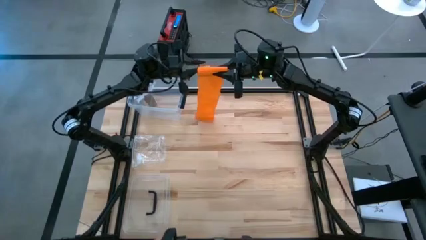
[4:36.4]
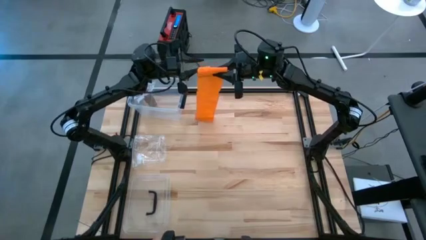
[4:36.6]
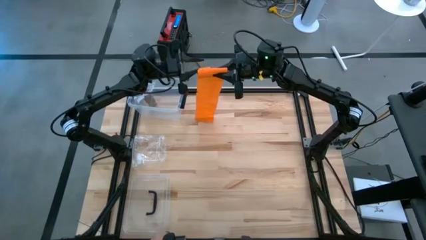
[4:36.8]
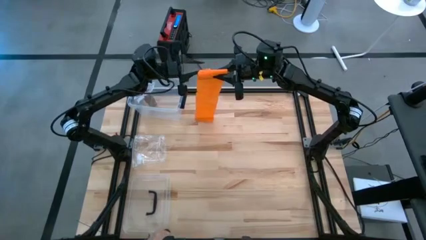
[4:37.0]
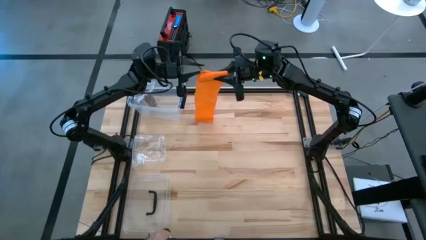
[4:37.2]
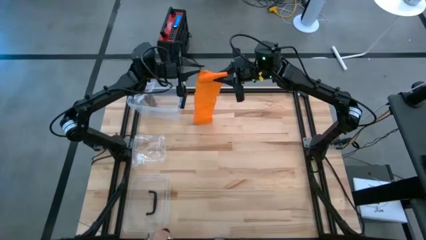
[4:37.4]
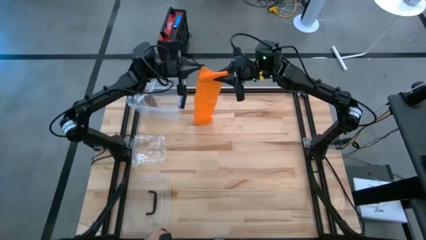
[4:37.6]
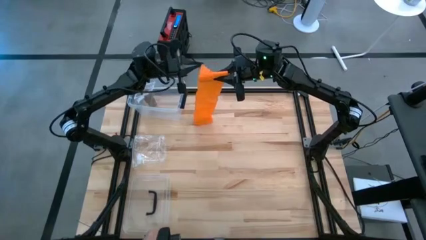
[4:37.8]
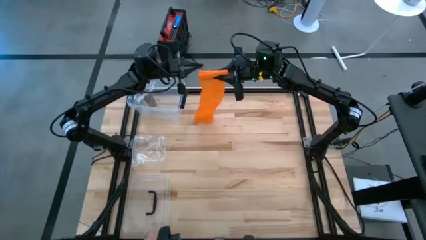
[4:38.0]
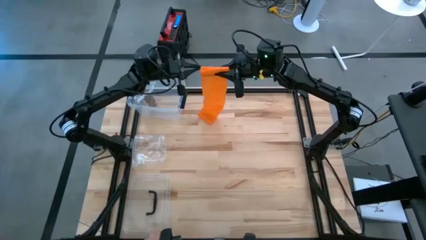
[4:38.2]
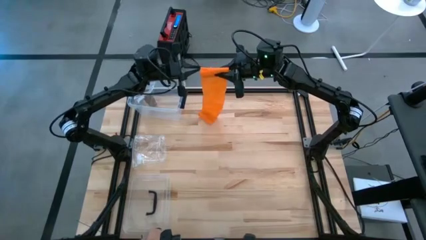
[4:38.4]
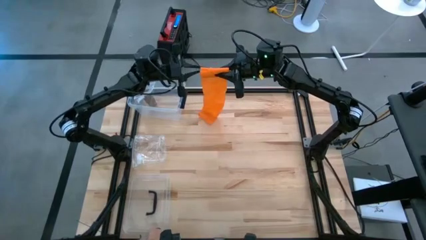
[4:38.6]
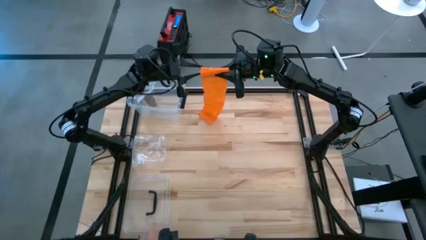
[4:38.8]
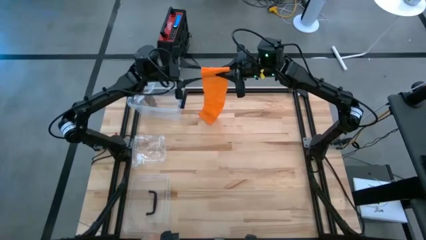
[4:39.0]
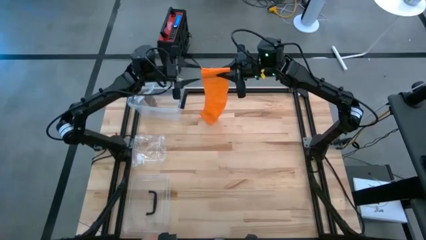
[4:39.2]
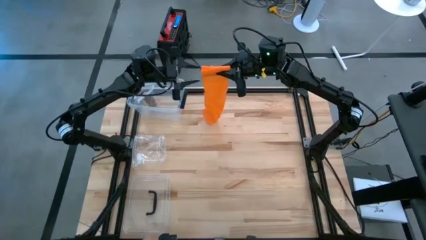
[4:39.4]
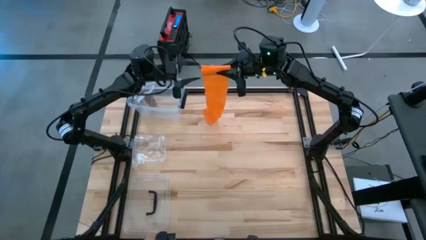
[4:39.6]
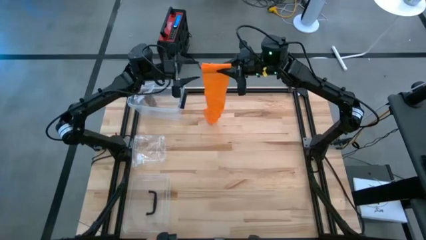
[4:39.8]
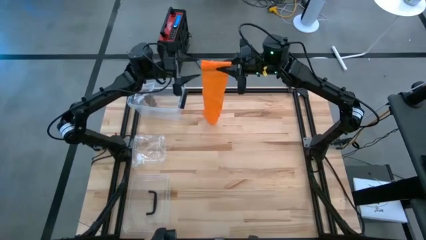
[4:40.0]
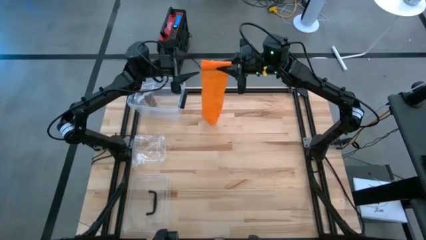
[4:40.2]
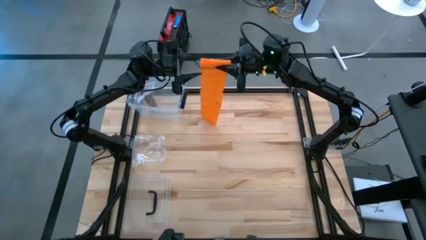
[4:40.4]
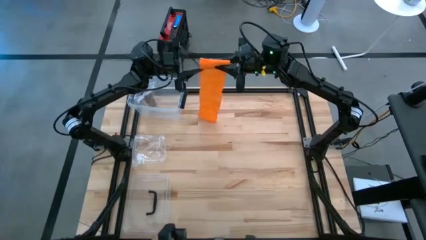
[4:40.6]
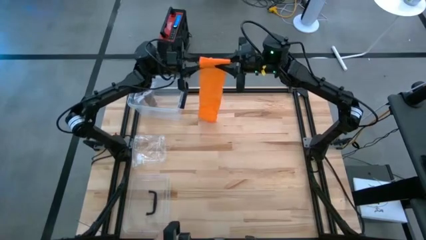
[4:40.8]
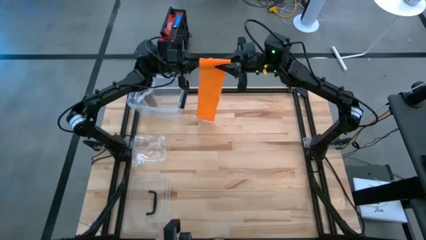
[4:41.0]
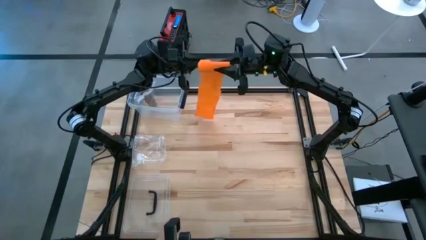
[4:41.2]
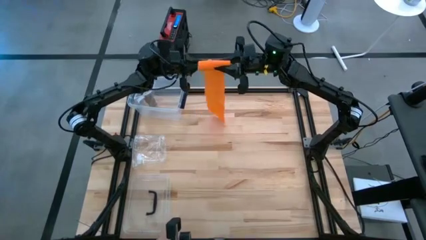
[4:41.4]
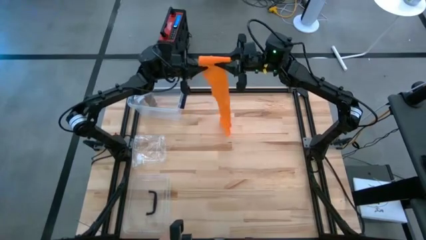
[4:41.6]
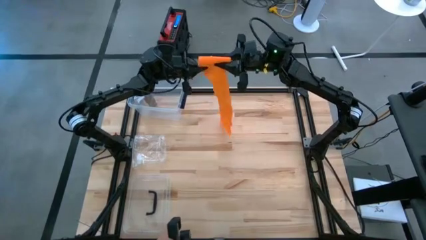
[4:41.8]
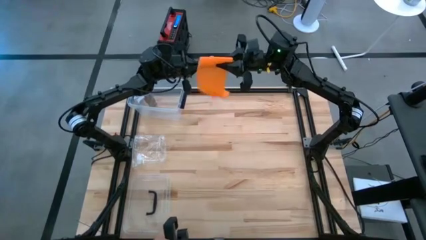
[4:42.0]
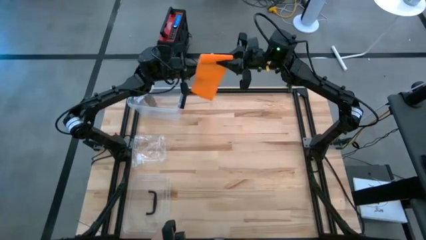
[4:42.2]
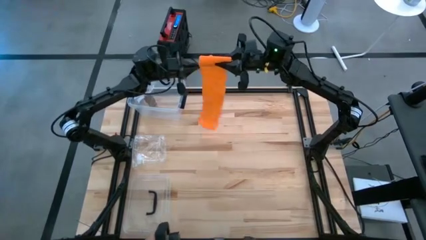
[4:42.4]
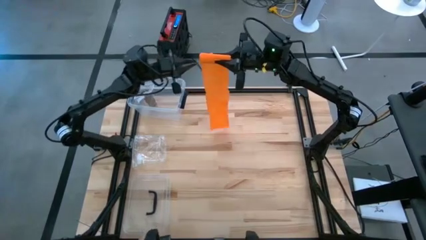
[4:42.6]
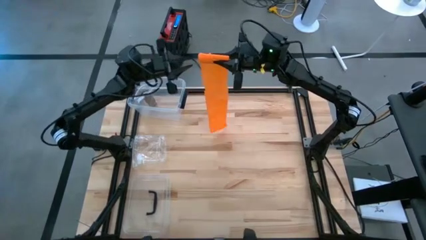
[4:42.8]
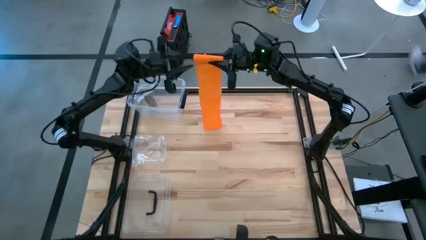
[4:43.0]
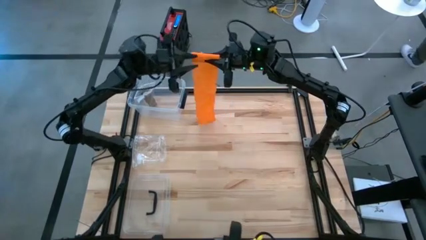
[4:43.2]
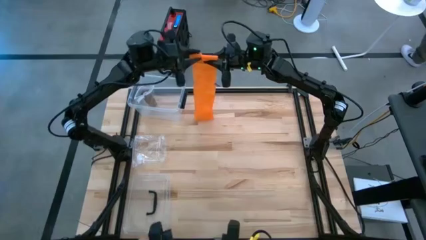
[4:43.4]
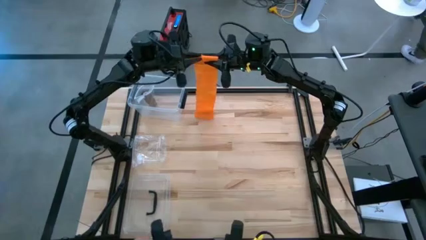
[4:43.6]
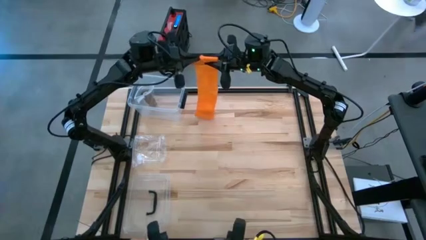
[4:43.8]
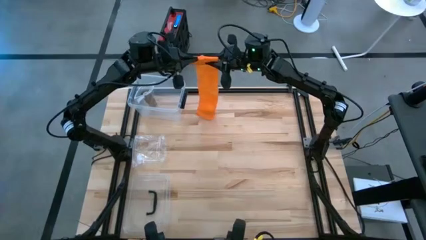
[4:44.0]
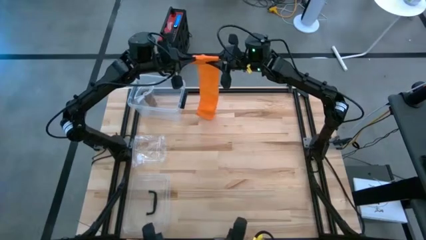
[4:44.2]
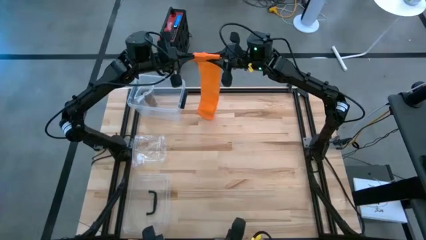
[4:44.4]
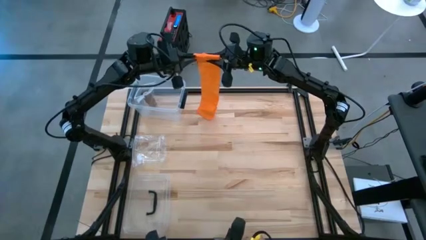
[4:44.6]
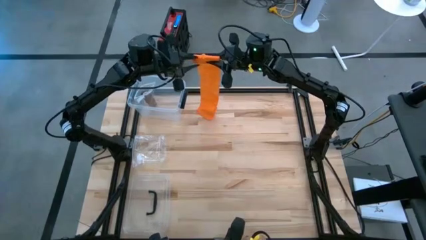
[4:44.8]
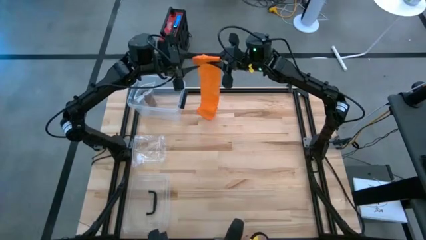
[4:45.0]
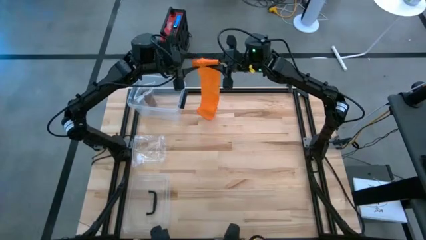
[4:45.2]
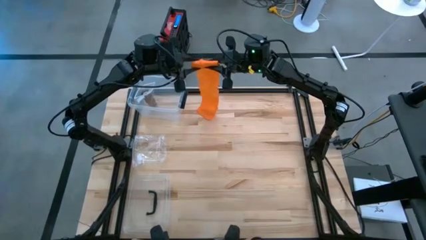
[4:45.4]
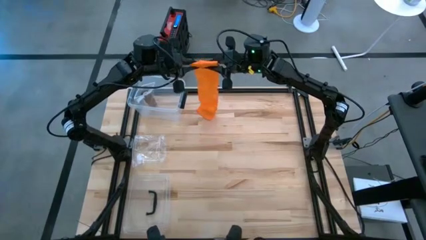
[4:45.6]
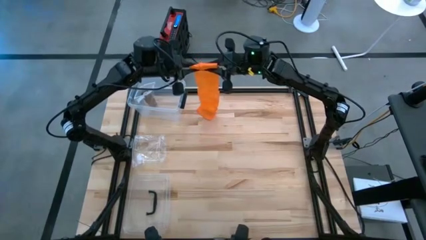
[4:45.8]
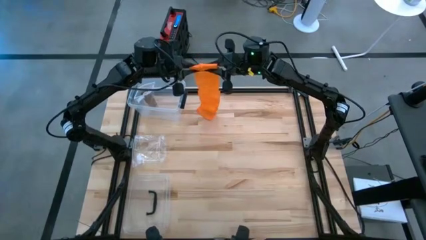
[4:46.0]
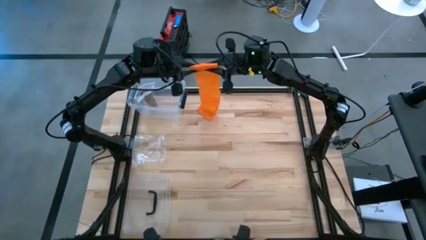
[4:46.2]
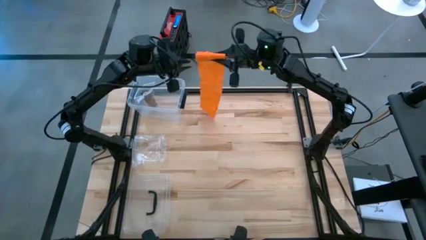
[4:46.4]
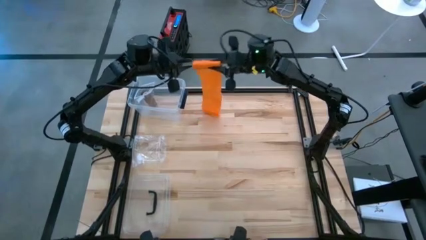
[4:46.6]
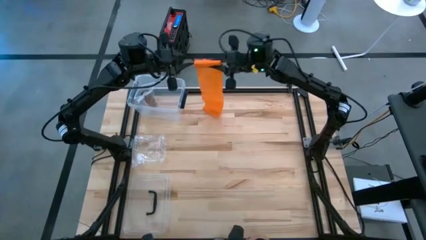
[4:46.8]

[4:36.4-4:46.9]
Task: Roll bandage
Roll the orange bandage

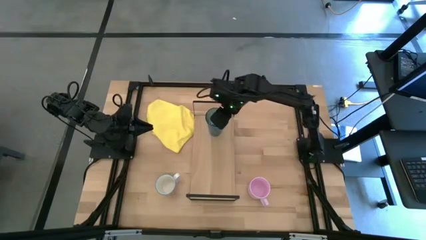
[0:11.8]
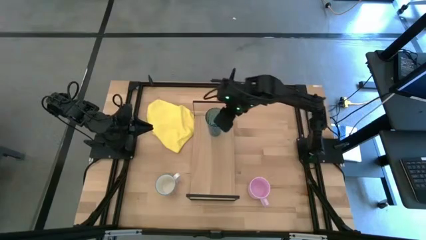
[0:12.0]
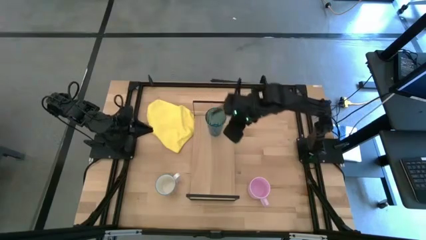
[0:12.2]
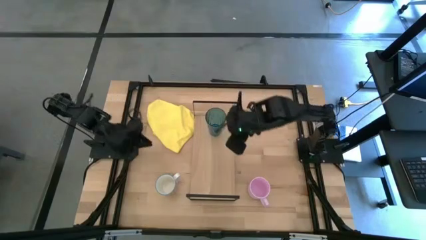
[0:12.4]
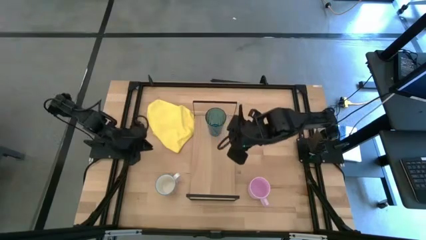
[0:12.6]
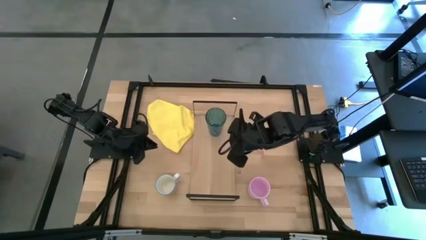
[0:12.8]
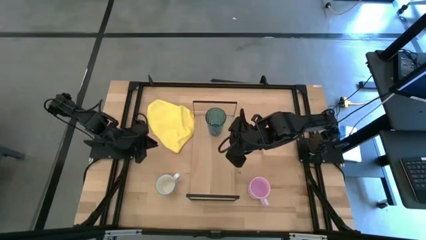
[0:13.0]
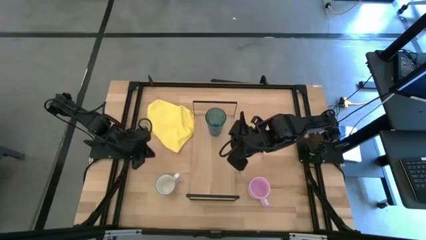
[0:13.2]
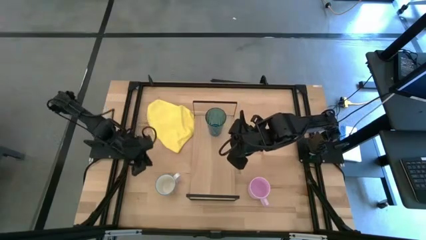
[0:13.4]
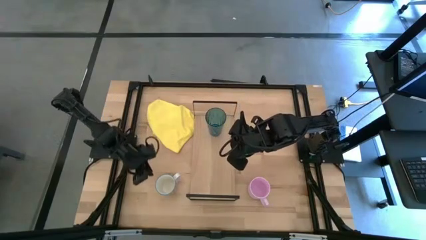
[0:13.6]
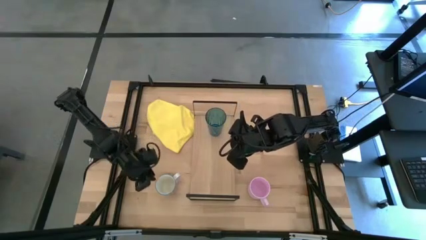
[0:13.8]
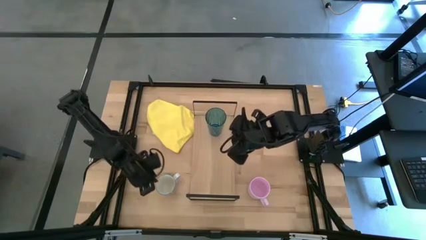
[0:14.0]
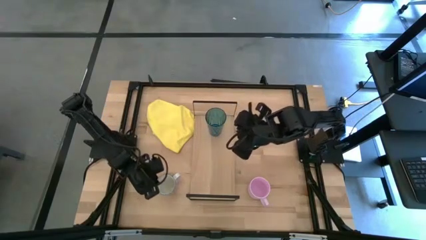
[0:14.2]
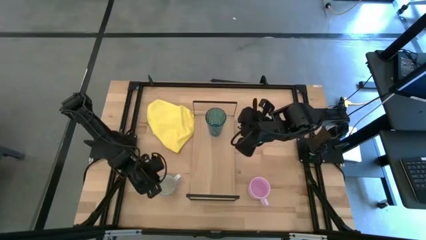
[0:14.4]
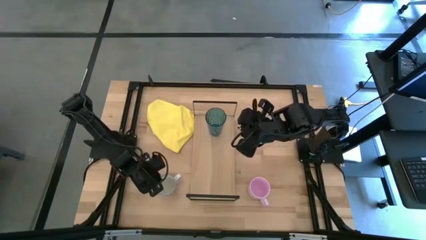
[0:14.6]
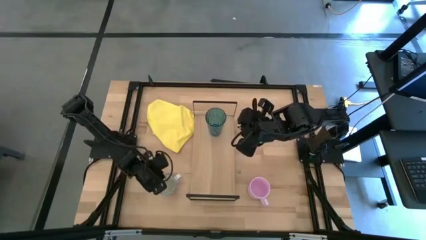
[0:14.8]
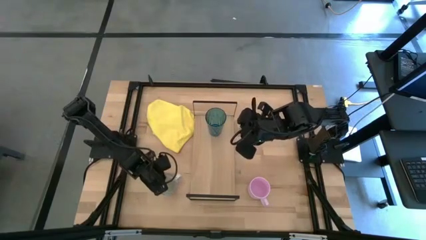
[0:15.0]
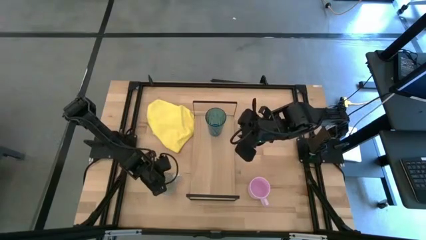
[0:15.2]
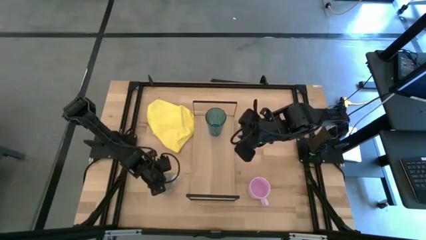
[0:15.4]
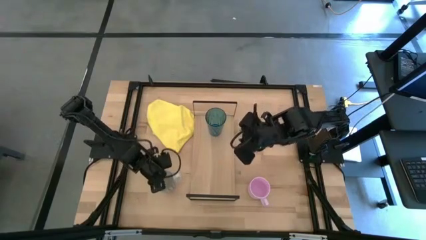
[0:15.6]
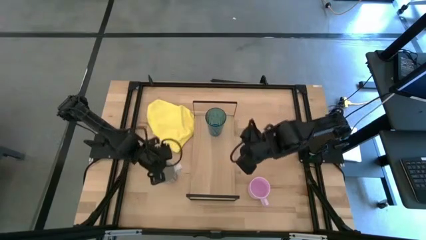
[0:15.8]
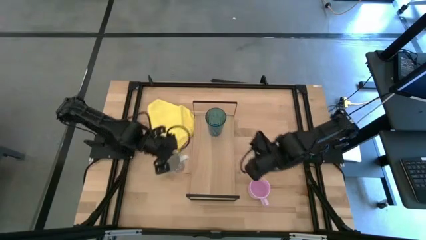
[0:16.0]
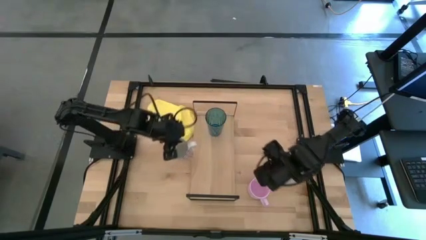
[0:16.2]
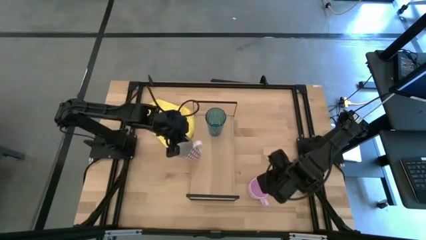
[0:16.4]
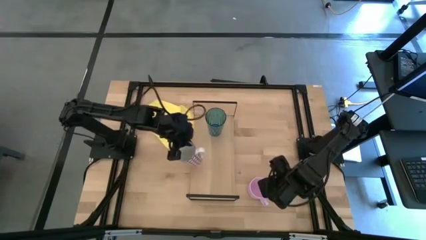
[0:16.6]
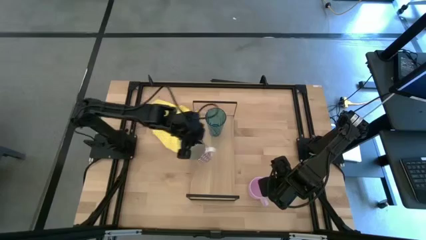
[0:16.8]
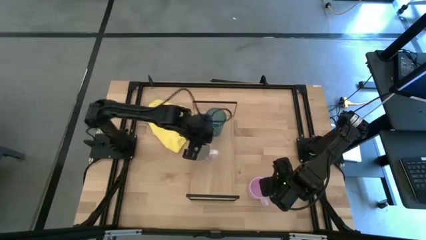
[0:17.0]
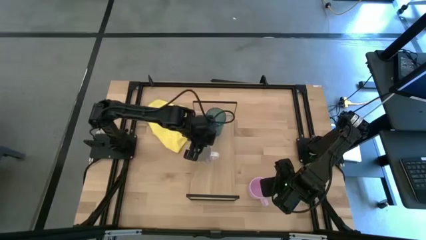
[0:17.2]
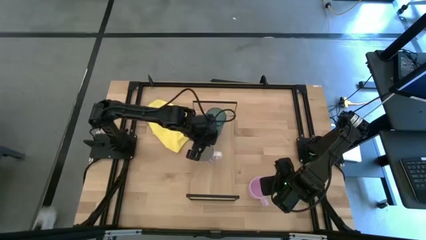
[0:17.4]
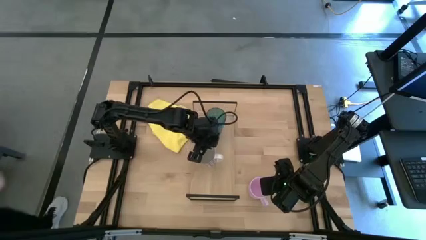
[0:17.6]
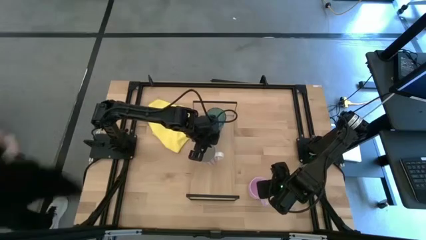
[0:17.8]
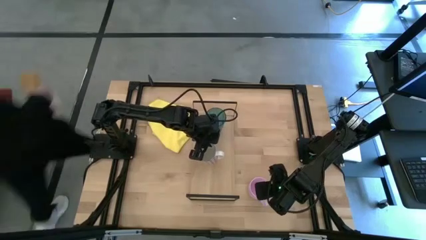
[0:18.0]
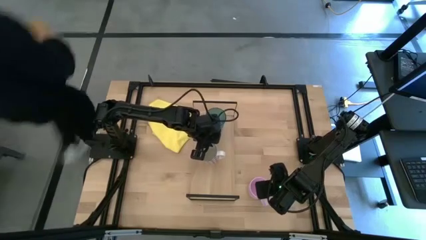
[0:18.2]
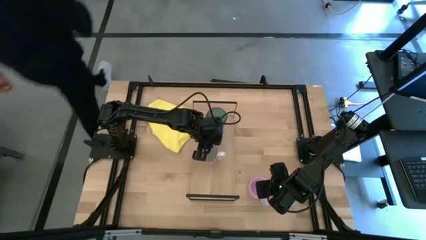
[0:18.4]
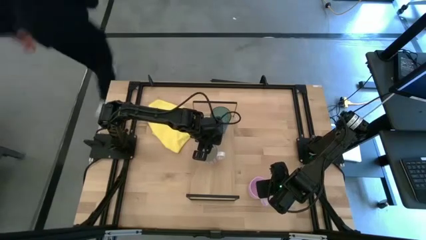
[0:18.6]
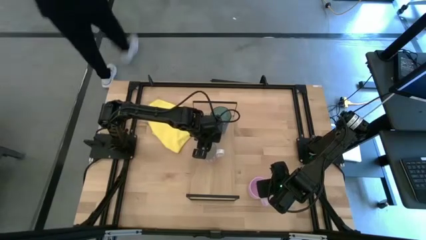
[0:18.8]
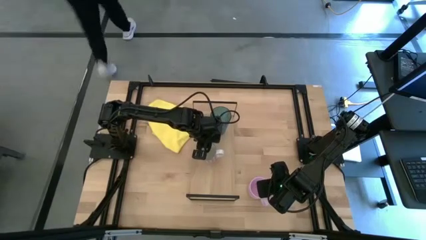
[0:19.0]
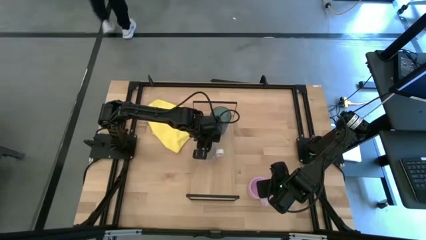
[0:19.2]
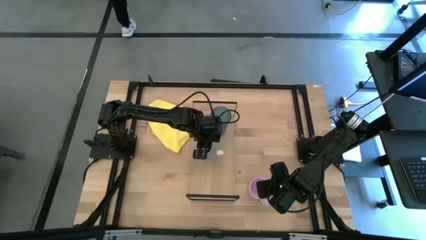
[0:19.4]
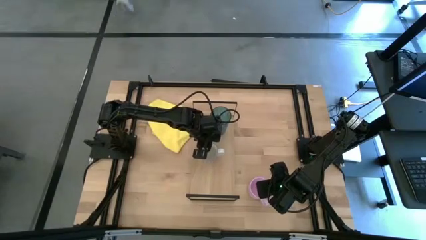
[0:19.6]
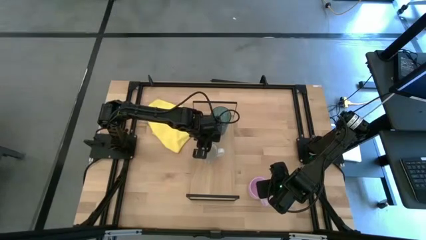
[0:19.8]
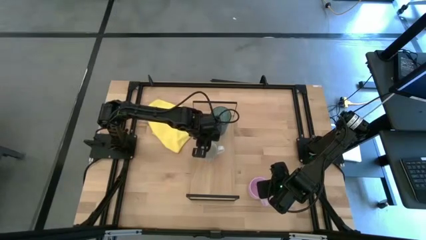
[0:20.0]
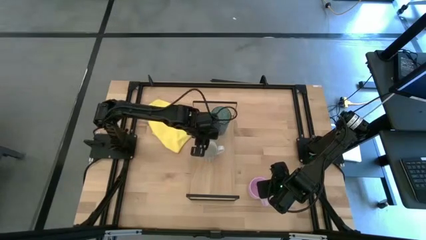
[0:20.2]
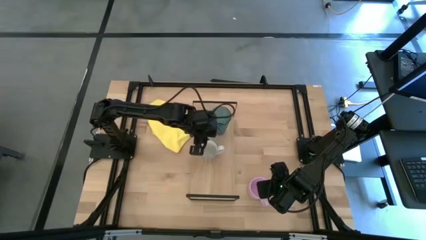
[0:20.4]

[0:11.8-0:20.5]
Task: Stack small to large cups/mugs on shelf
Put the red pattern mug on the shelf
